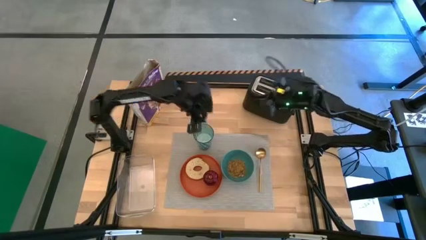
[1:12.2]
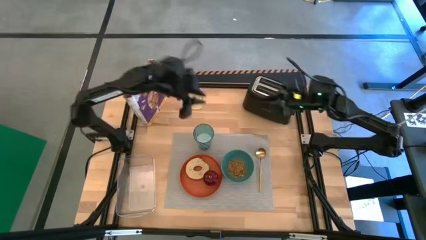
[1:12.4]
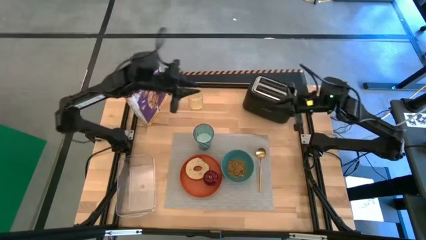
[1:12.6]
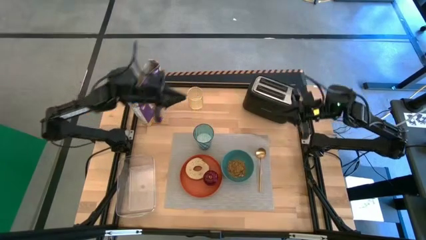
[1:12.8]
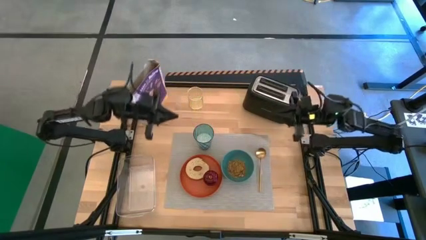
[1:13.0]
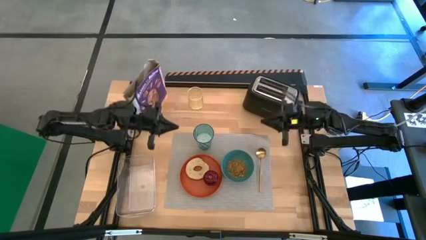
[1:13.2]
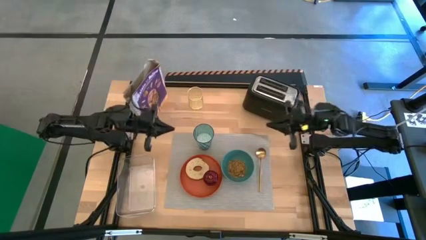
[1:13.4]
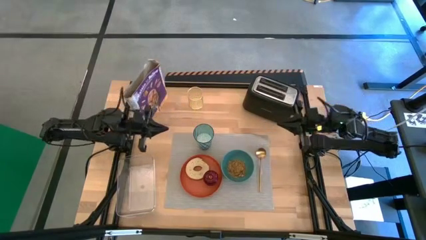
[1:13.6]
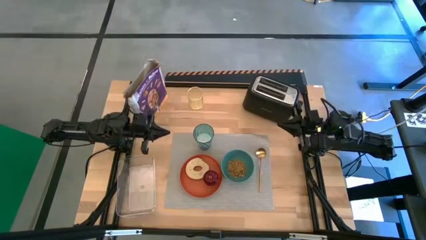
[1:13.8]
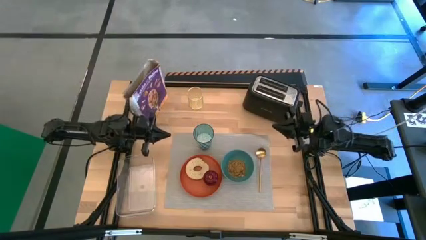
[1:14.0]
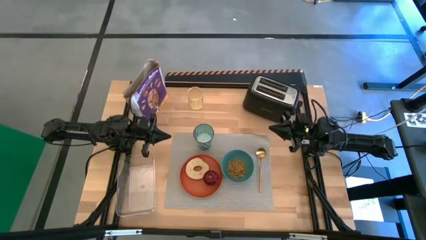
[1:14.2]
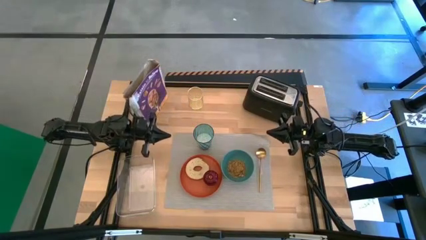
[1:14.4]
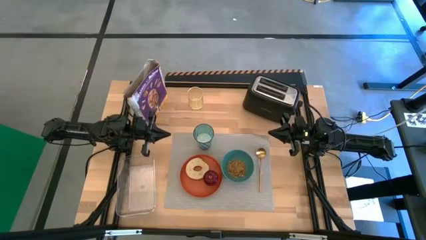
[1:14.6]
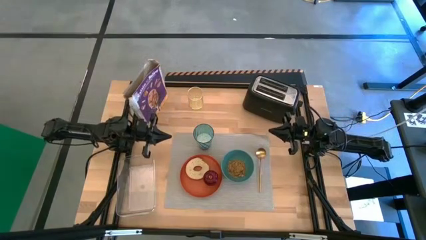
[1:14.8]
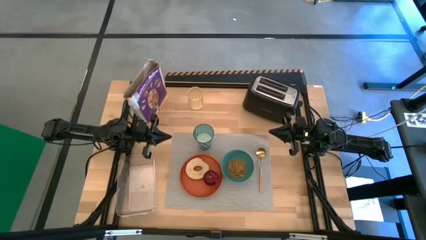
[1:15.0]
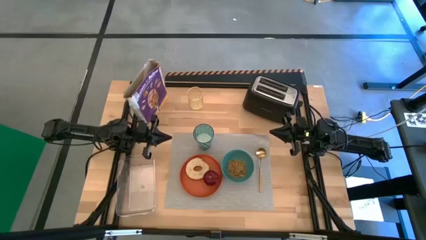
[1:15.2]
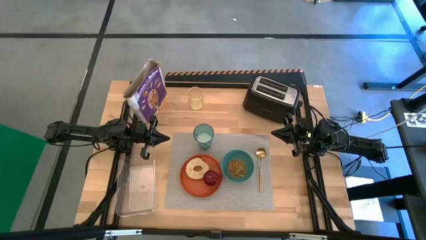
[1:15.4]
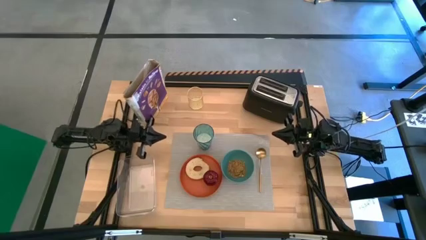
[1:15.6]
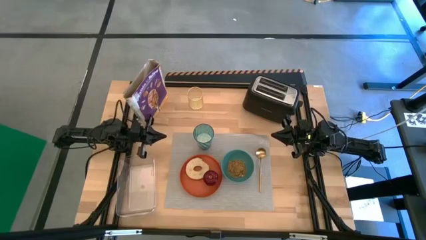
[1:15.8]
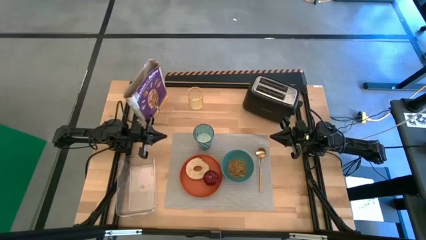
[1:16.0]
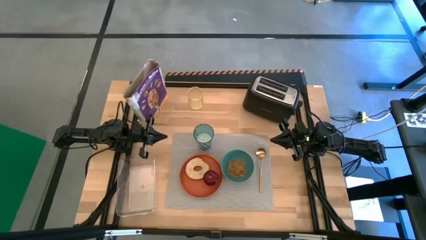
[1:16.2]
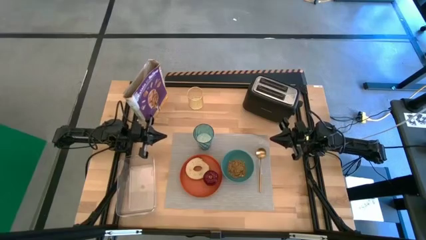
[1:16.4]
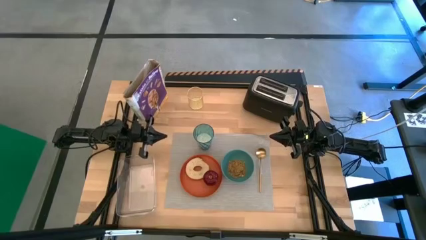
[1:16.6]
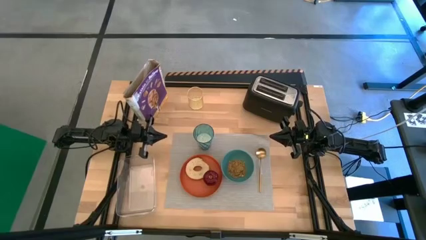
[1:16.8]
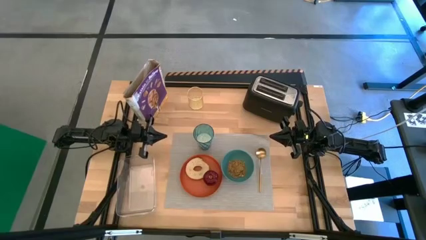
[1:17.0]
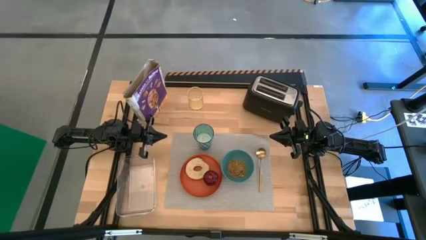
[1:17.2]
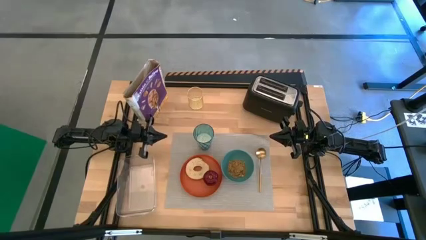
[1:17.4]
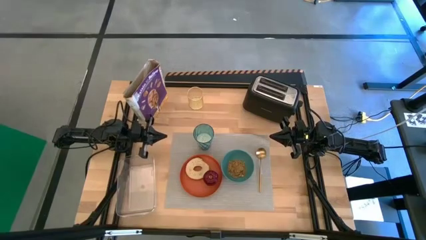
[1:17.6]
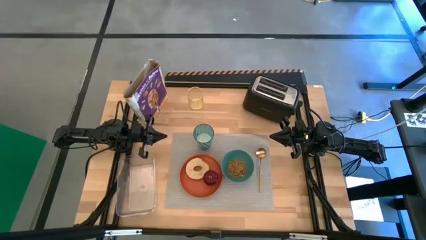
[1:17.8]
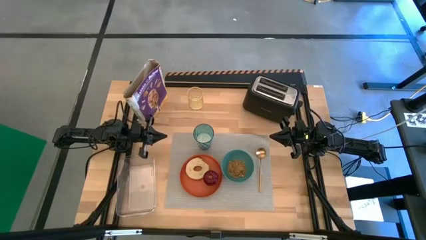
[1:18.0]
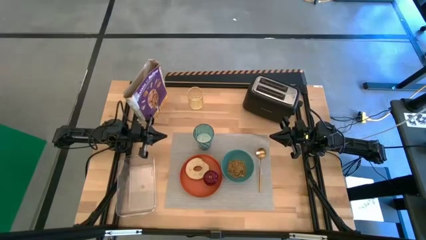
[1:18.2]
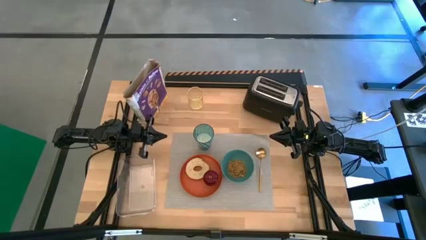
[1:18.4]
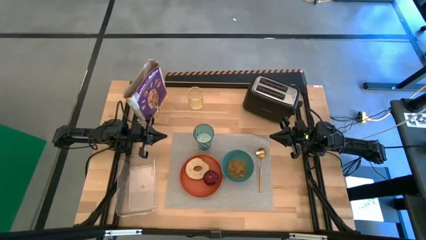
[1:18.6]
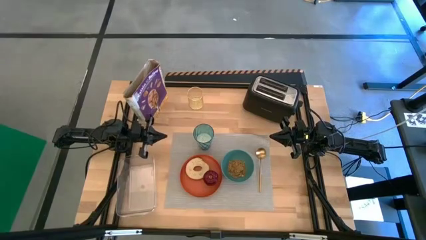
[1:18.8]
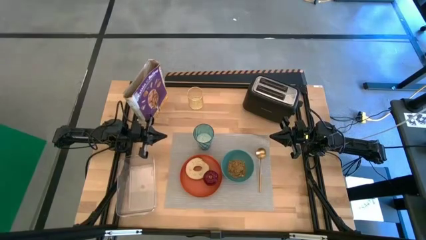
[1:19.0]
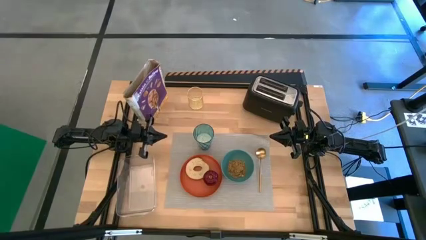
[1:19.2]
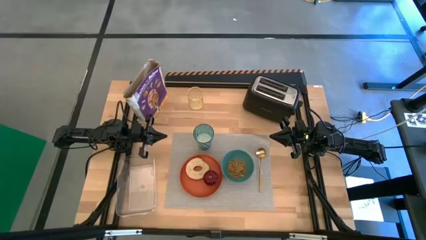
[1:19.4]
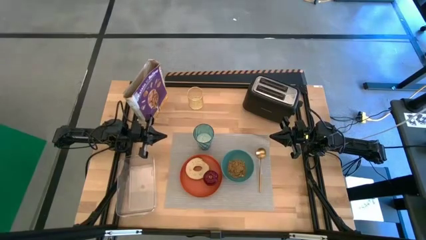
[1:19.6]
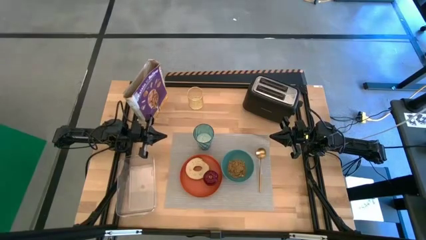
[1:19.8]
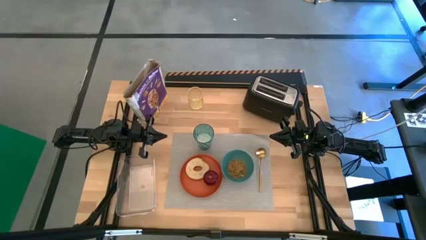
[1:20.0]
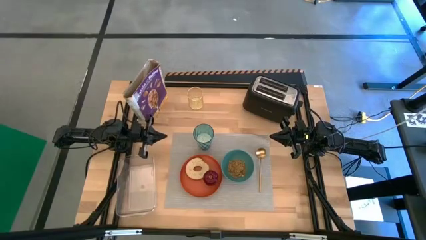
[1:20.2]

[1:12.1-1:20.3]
Task: Arrange a breakfast setting
Return to Home Position

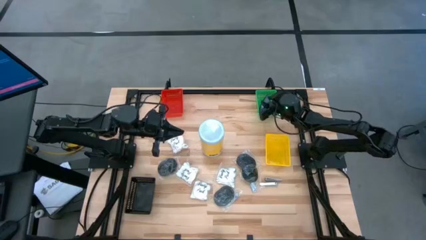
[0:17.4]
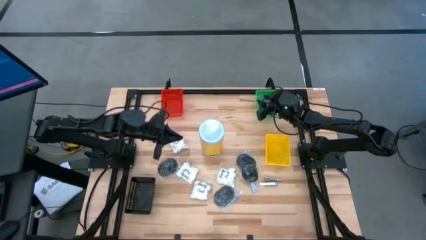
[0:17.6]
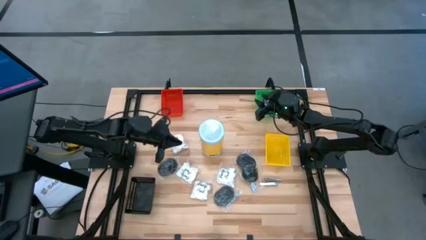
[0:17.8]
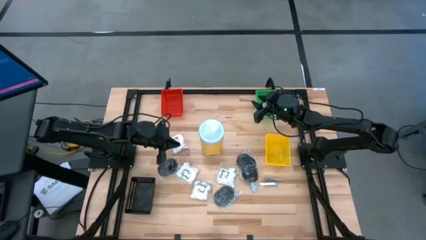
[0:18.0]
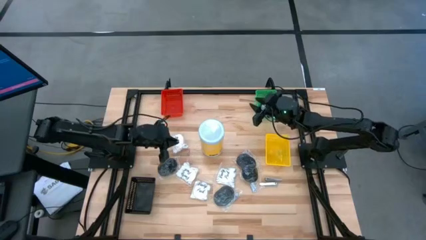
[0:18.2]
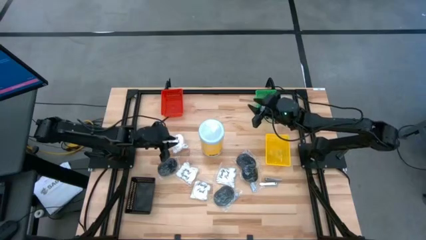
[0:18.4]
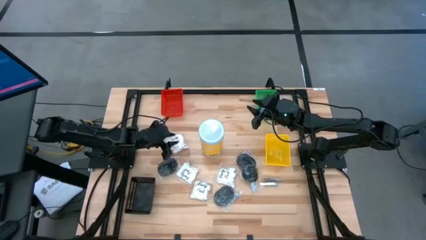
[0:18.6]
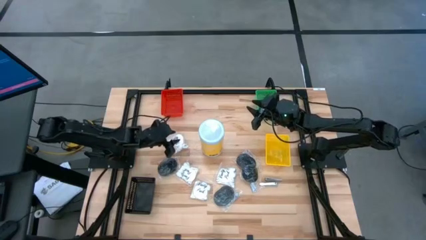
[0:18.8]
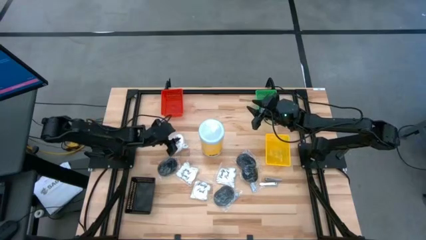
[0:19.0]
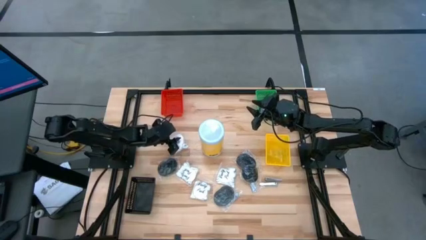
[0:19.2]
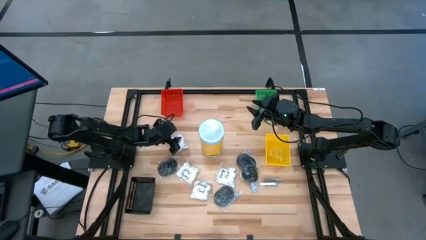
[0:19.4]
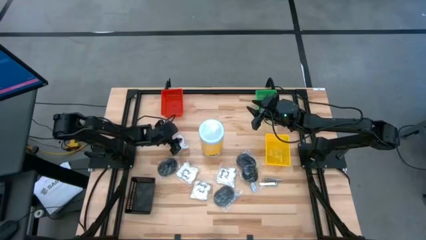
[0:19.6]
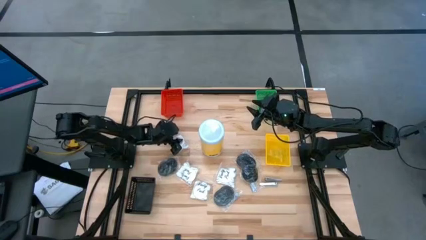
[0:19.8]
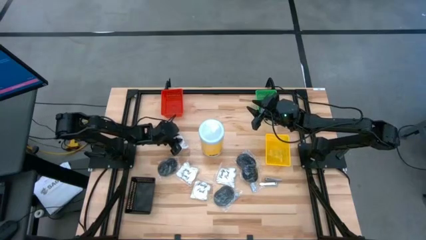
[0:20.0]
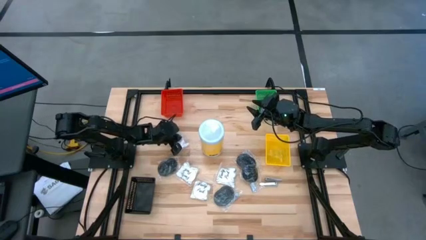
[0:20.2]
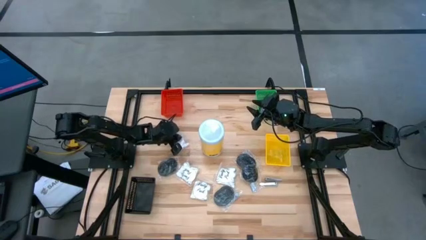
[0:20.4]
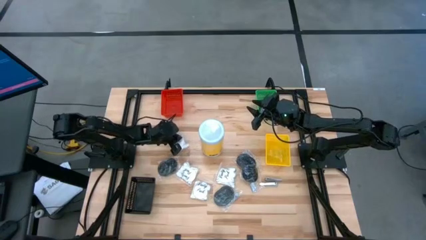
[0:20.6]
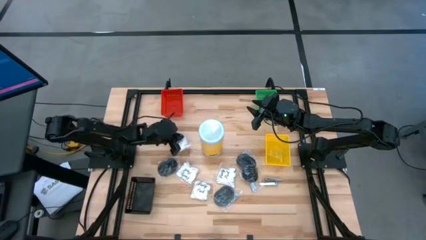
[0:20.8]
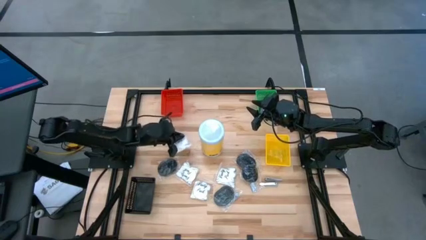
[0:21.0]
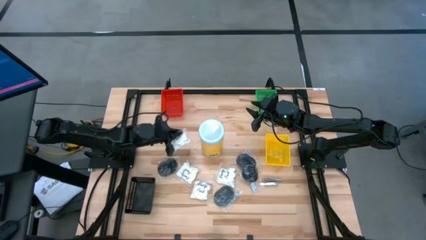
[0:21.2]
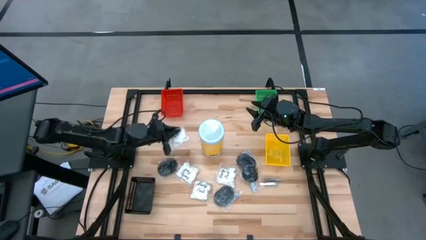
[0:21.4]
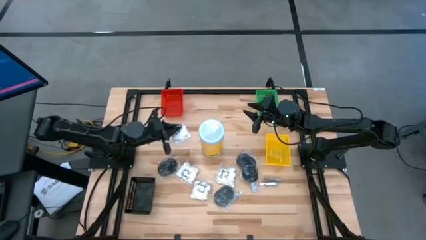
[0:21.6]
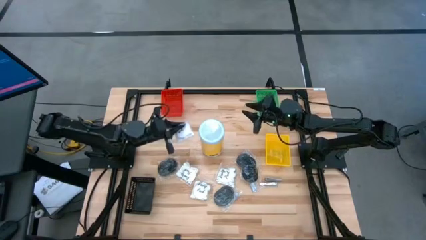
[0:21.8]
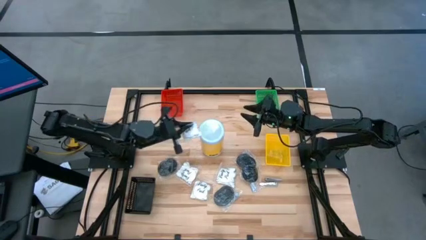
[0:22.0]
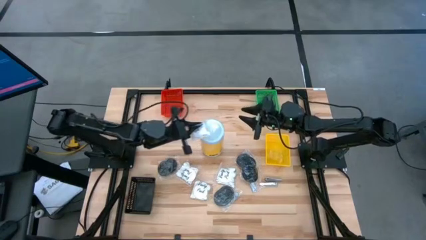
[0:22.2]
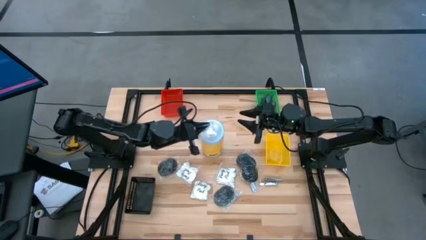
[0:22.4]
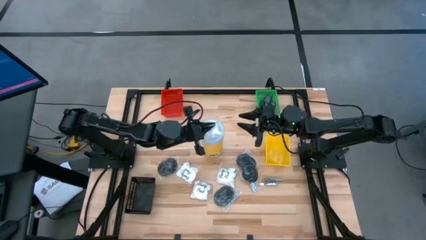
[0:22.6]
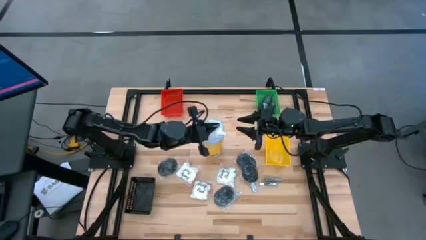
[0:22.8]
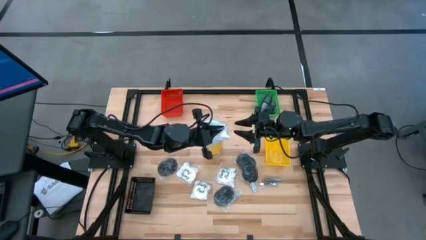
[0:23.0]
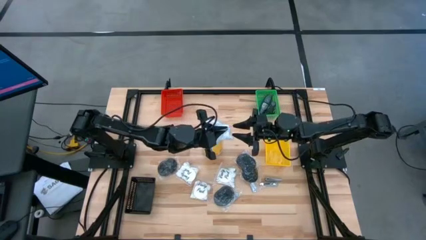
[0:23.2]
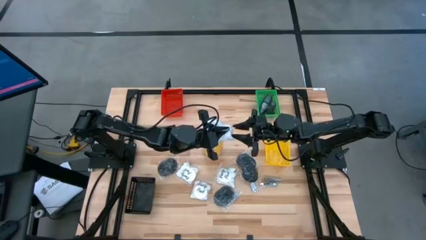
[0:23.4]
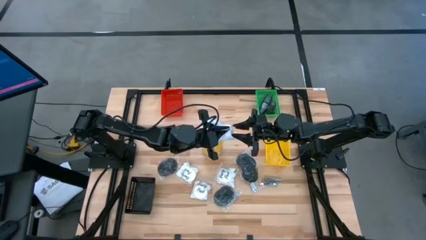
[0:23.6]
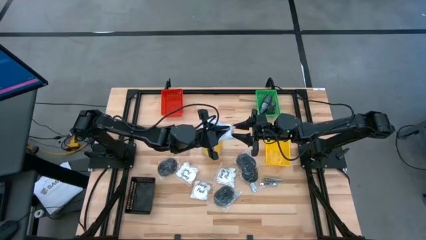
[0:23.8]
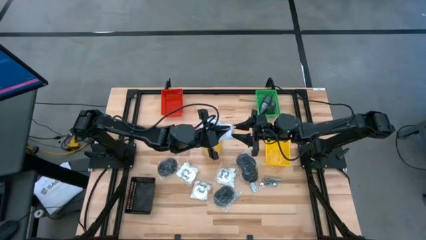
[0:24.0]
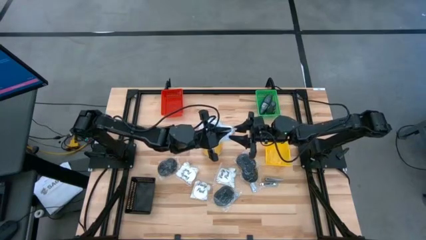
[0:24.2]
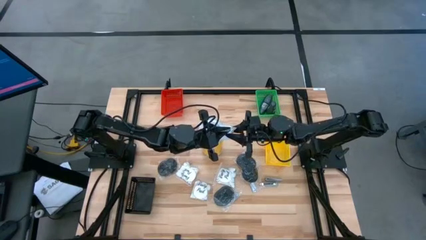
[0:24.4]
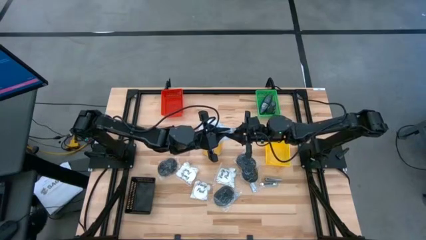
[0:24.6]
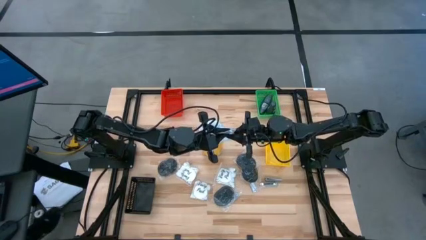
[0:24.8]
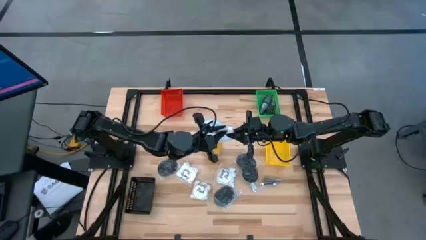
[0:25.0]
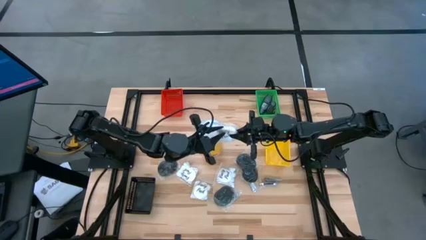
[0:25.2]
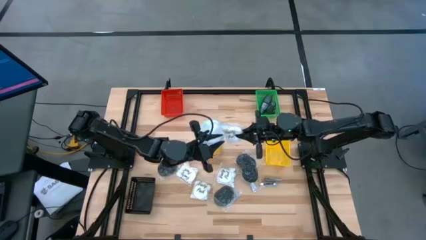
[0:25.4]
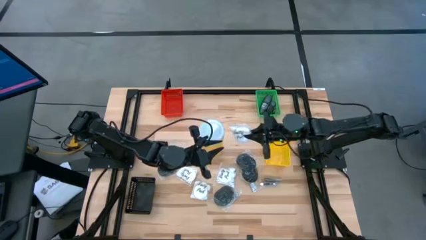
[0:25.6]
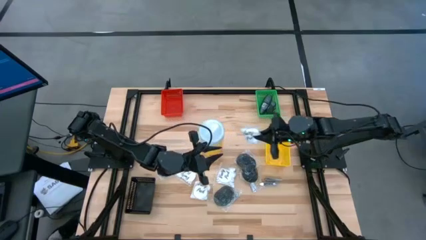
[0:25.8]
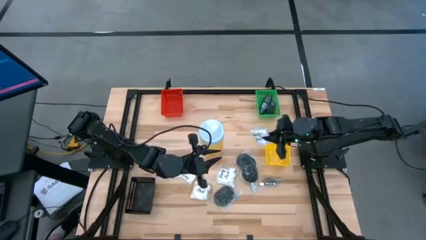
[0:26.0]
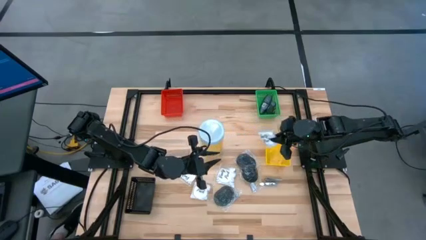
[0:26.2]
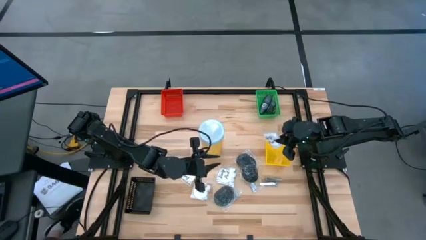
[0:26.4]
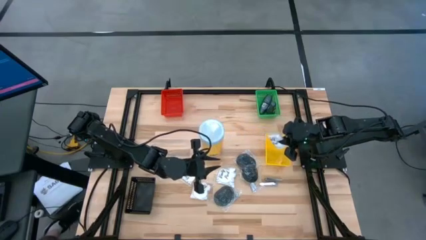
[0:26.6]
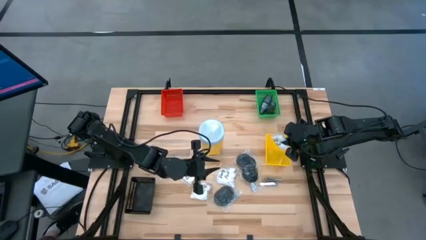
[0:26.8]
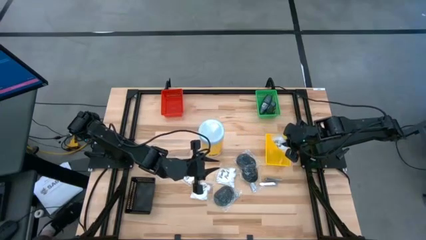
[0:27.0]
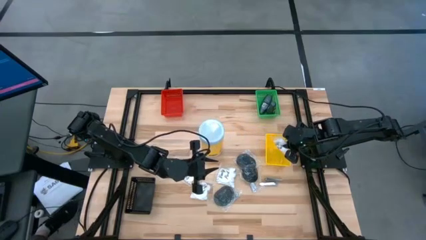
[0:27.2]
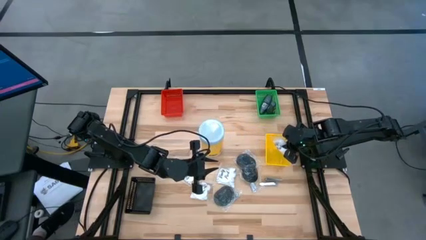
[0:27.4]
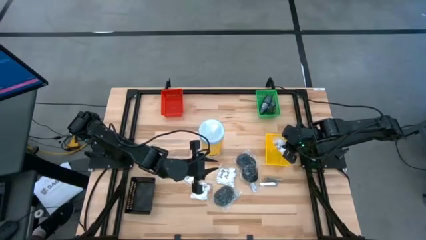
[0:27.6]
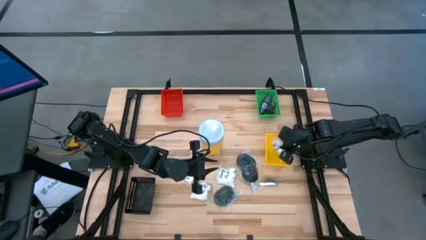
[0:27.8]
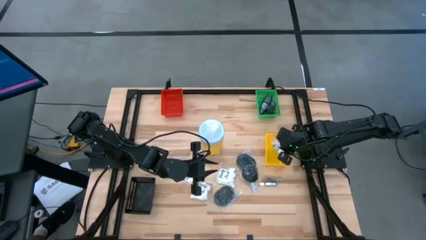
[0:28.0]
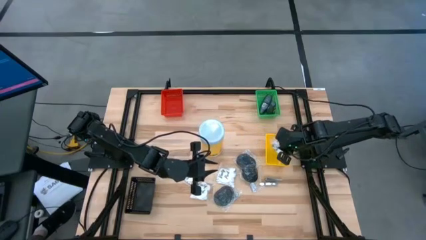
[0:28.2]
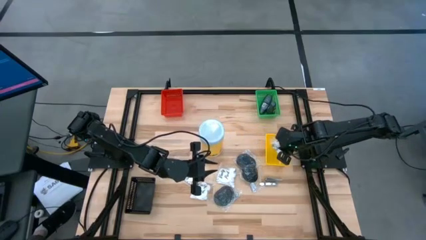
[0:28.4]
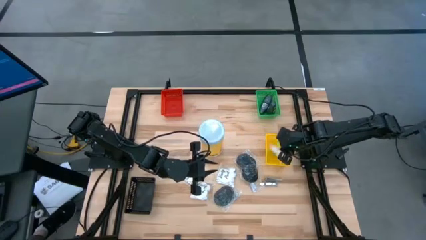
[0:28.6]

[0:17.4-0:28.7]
Task: Pick & Place Travel size toiletries
Put the white cotton pack into the yellow bin
